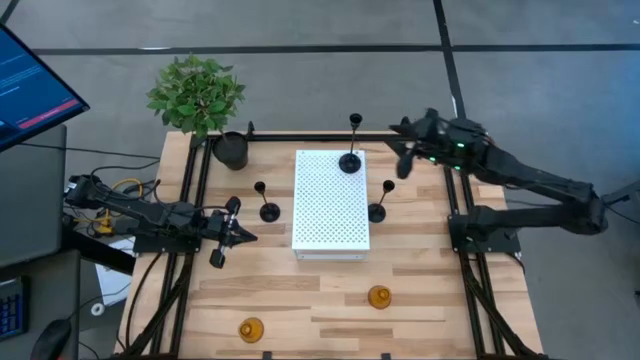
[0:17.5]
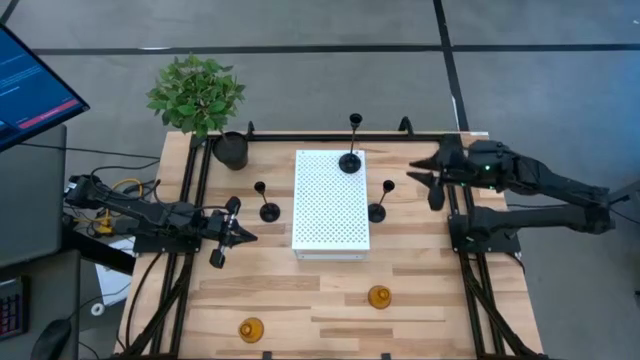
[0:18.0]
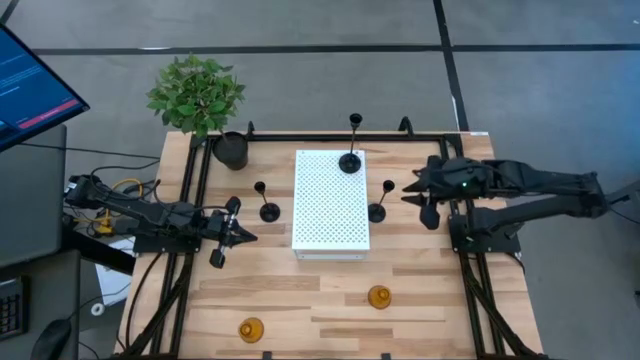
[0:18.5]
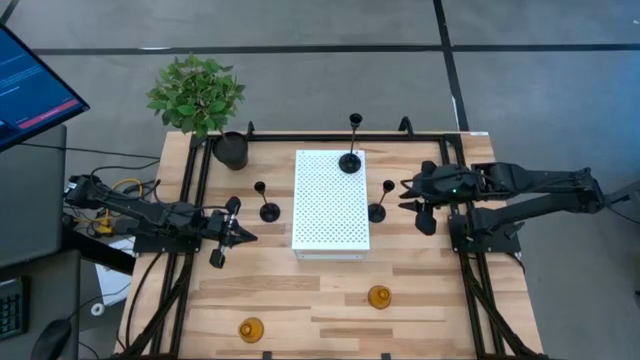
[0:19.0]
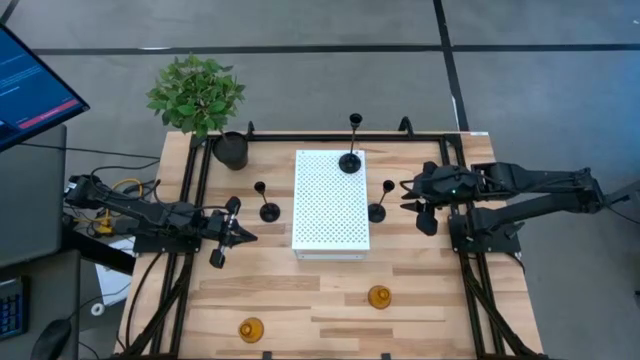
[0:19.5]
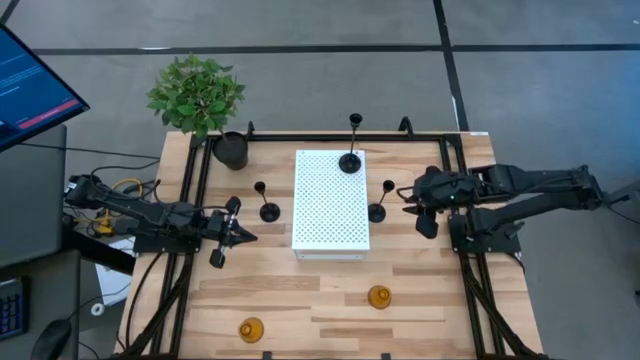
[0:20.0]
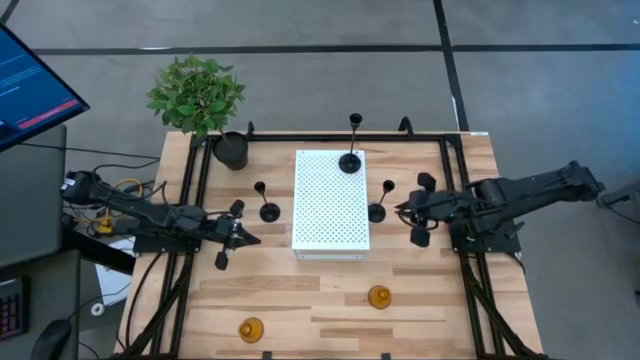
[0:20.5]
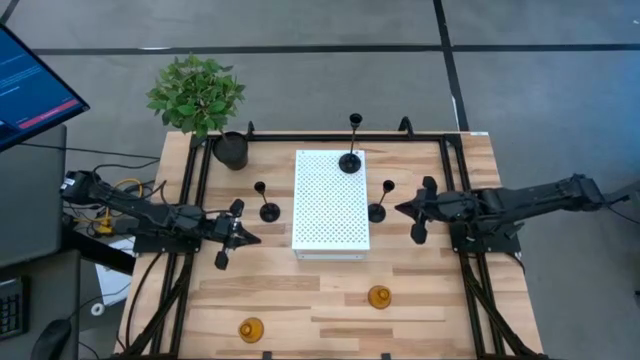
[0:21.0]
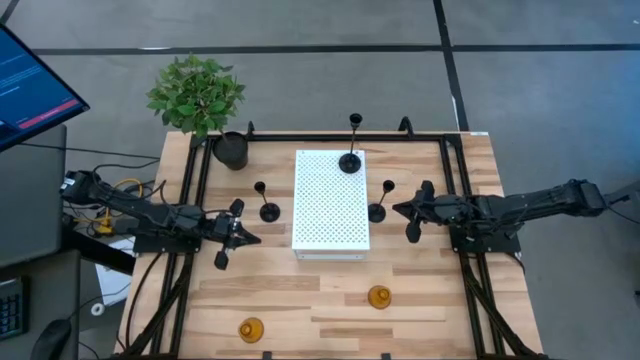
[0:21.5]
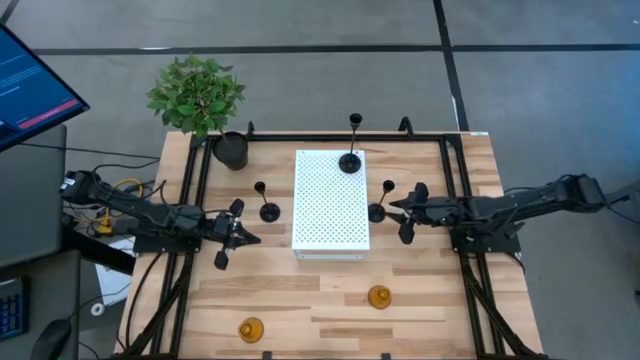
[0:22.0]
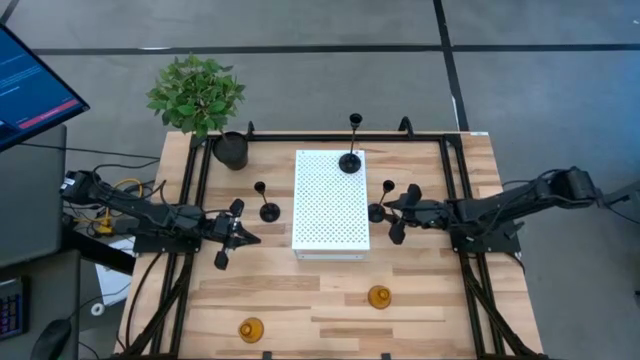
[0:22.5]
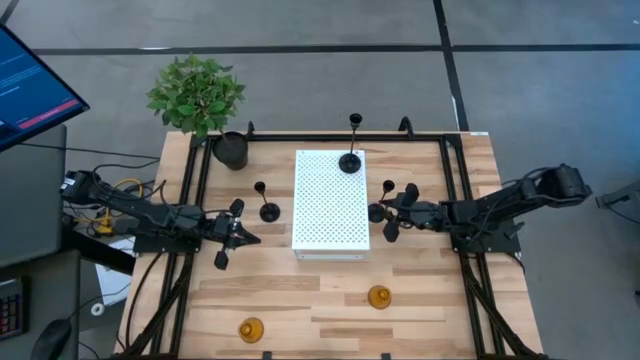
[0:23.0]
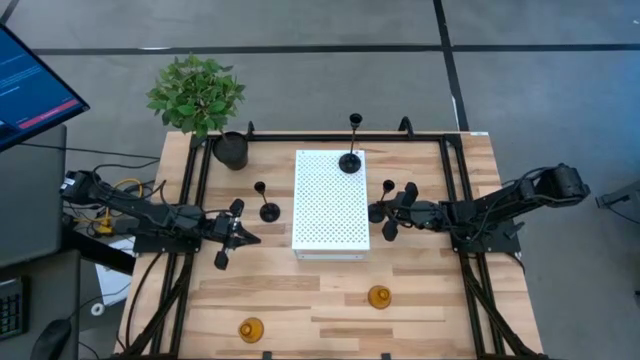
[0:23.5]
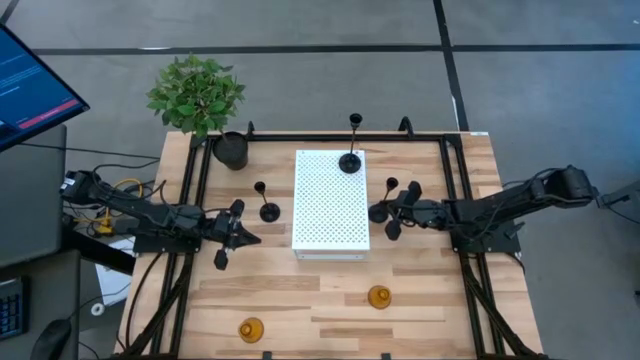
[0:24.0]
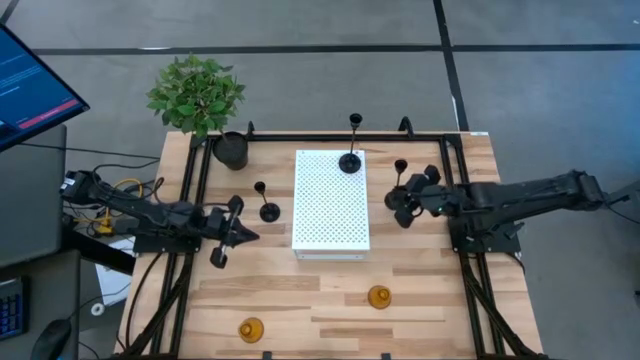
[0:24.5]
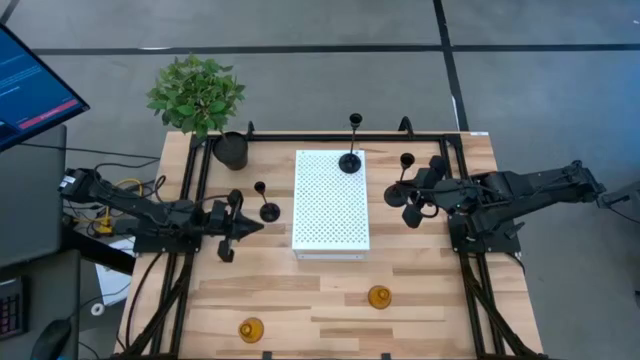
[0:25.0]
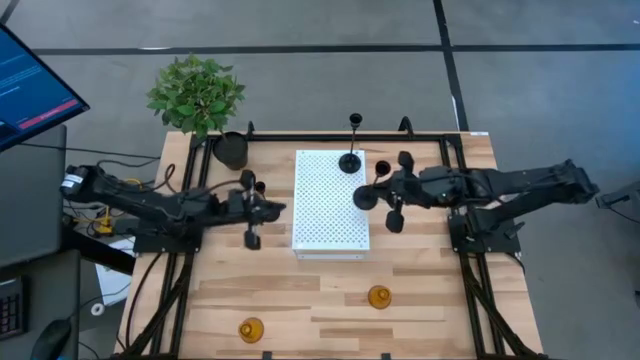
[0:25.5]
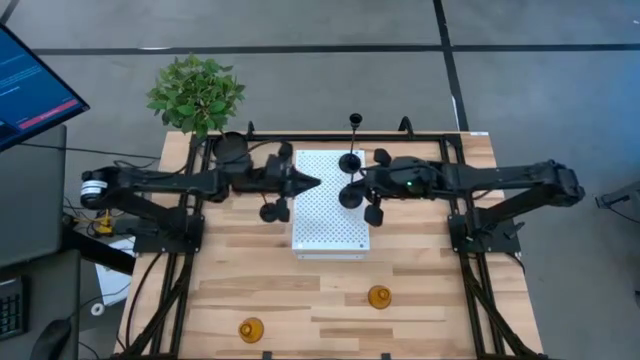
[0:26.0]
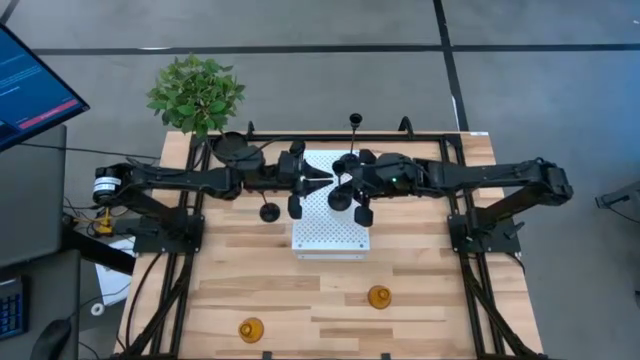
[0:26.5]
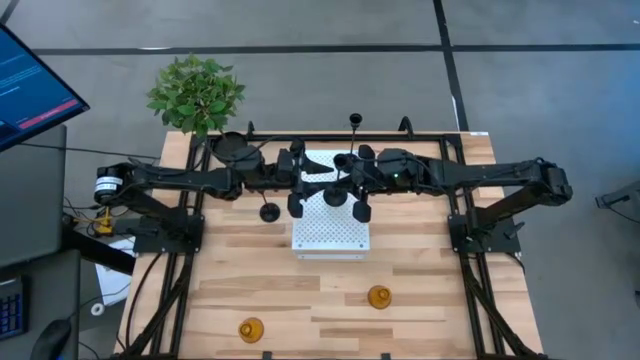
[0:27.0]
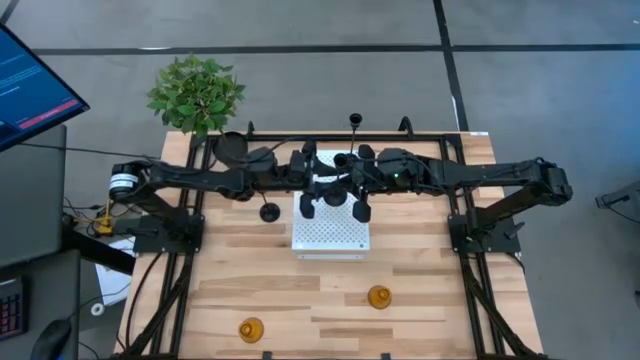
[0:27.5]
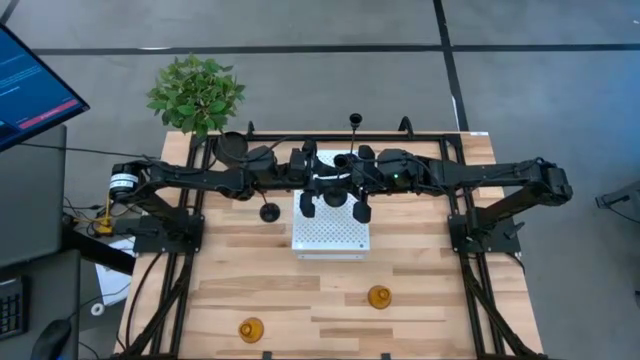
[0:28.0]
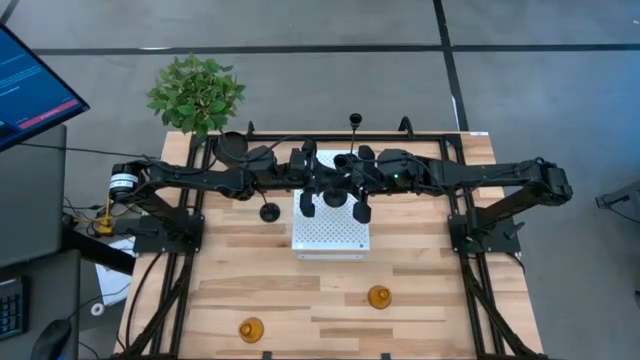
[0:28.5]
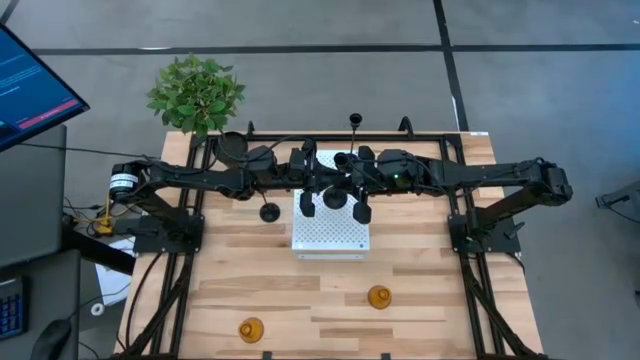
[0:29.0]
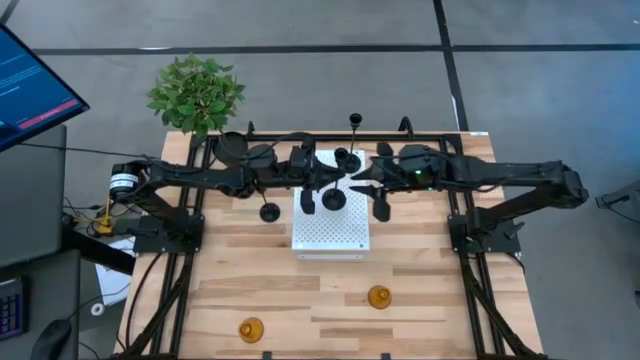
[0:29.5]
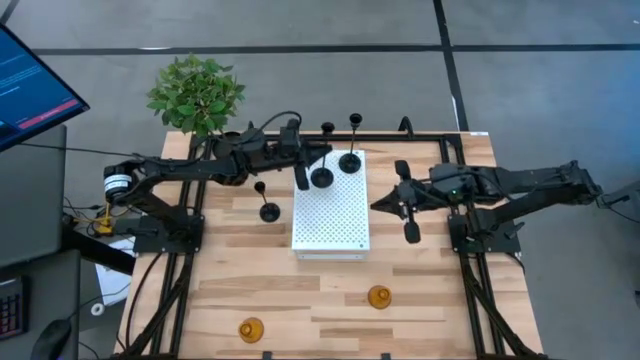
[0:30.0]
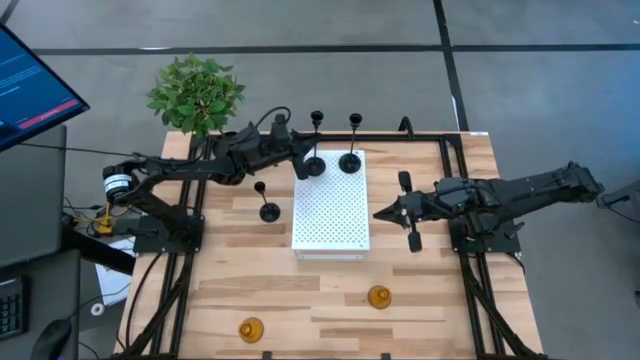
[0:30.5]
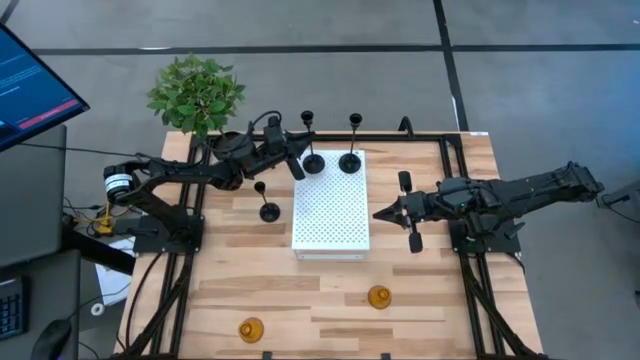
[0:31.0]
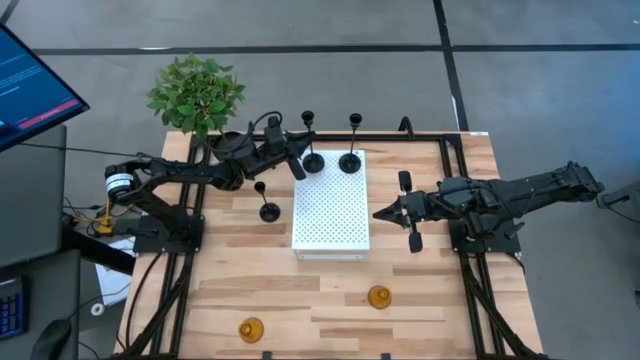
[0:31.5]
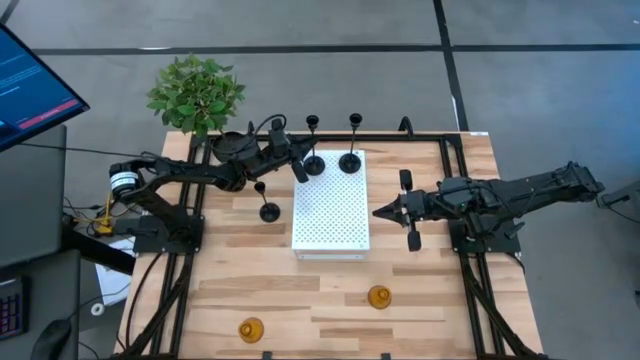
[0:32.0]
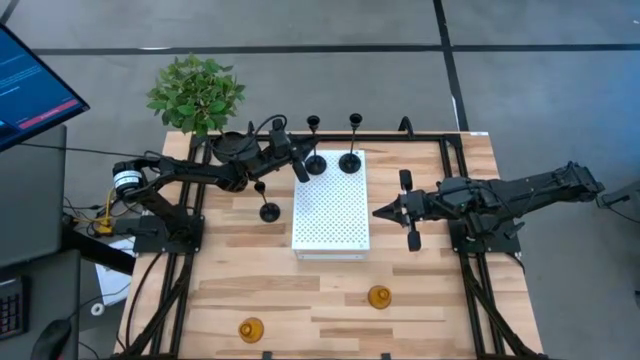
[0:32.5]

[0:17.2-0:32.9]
Task: Pick & Place candle stick holders
Put the right black candle holder on the shelf

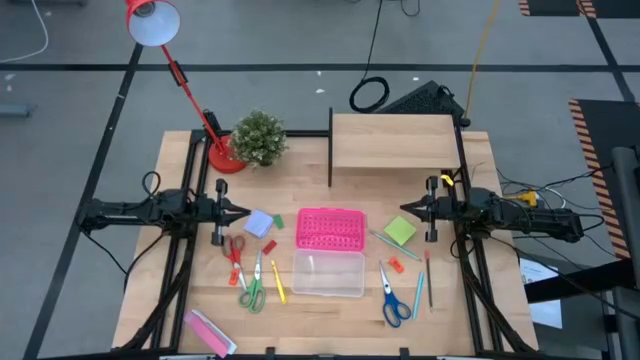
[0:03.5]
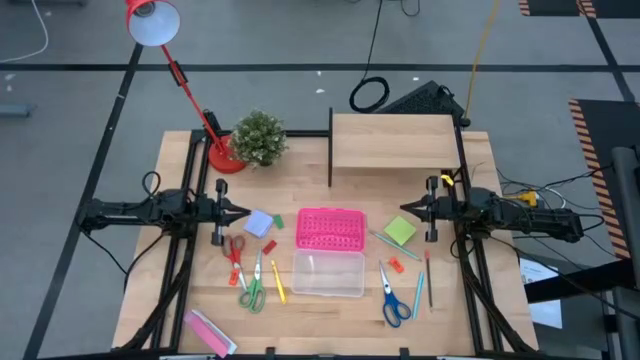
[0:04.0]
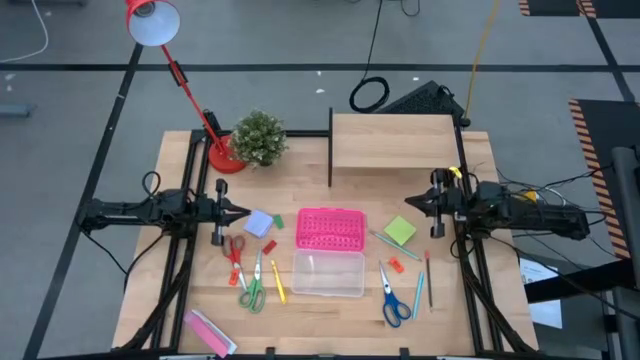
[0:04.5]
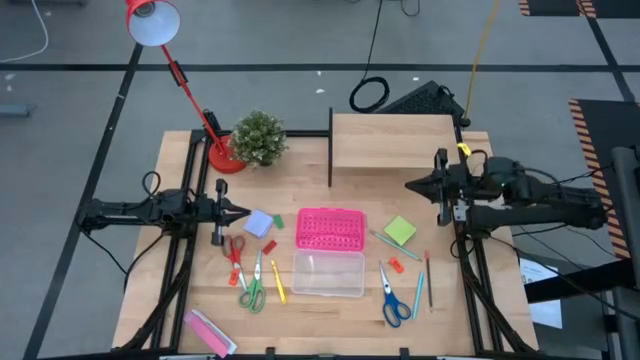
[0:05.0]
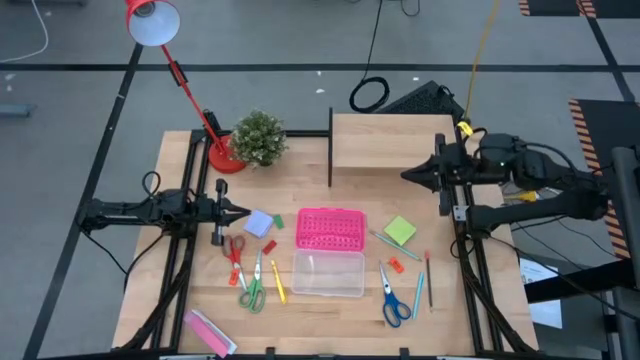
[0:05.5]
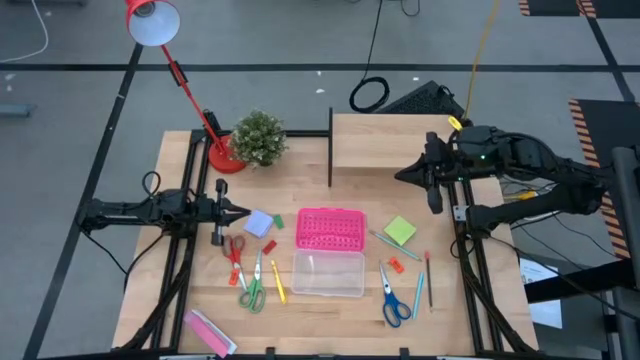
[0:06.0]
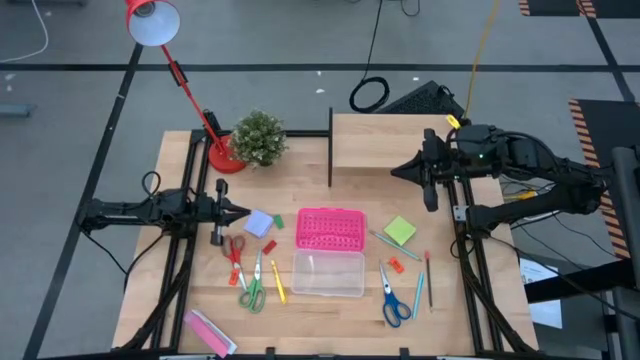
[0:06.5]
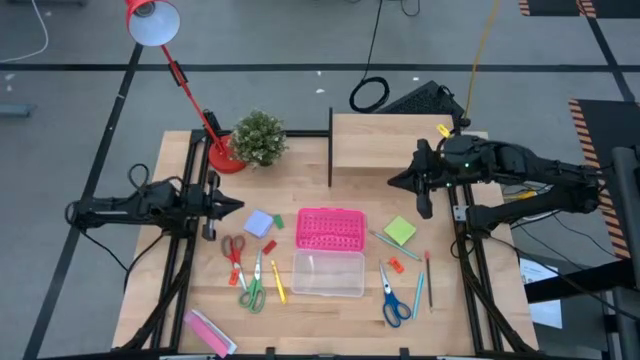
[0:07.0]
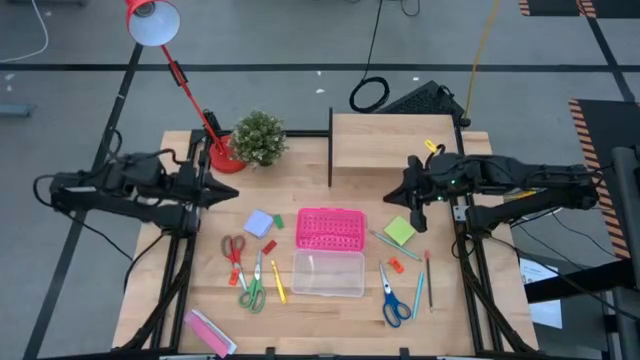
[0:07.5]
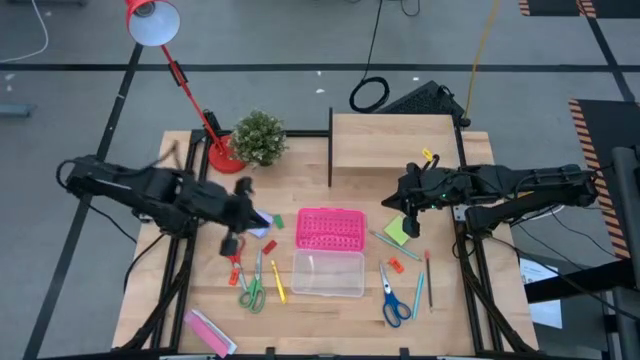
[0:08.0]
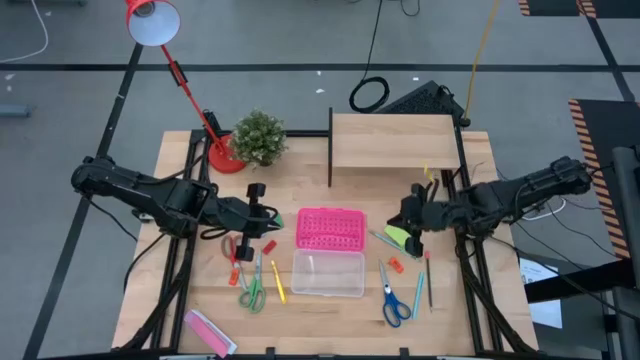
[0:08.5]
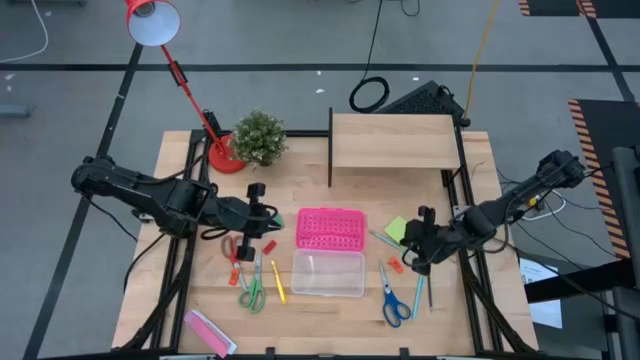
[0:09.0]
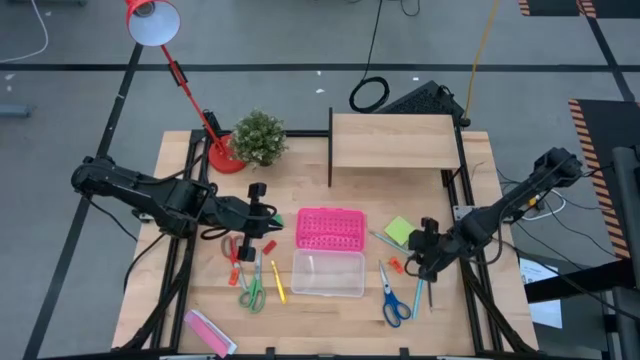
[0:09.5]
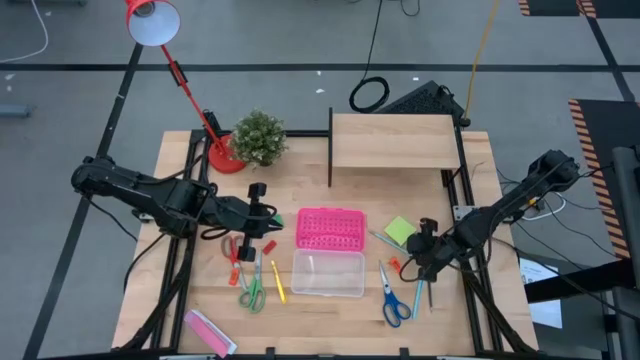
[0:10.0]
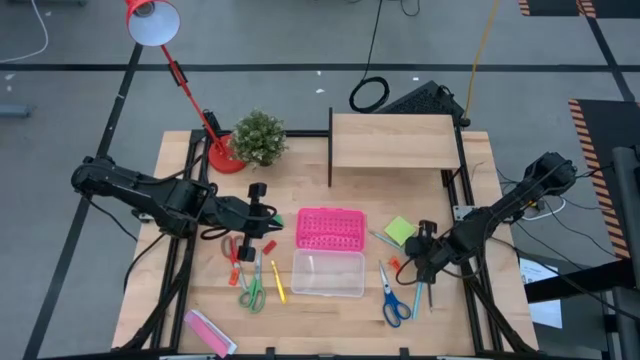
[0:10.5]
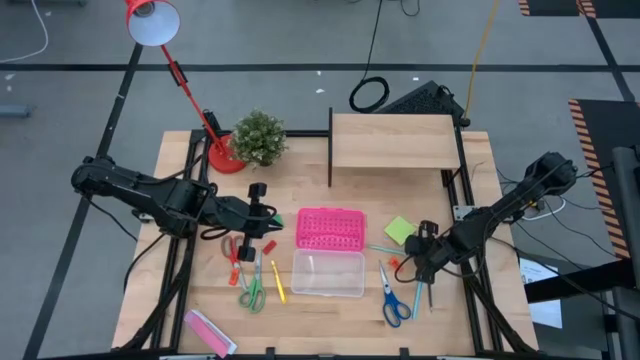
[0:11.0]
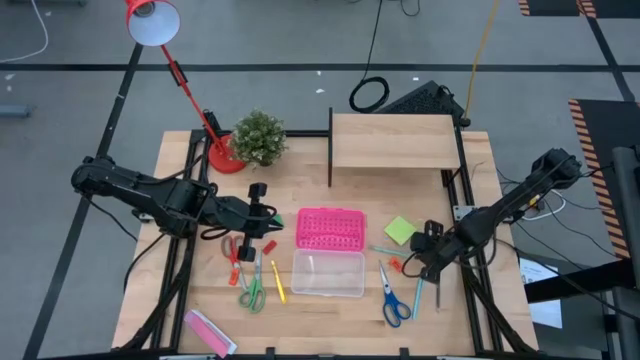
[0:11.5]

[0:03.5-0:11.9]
Task: Pack school essentials
Put the light blue pencil into the pink supply box
